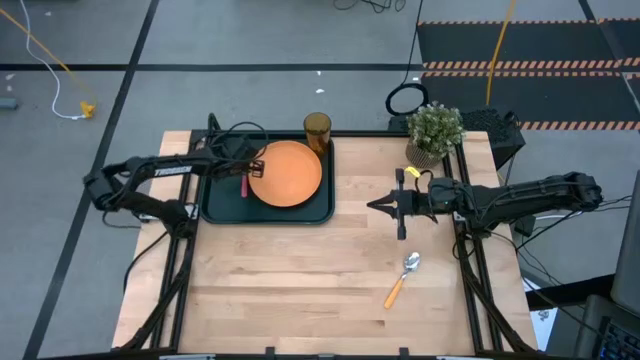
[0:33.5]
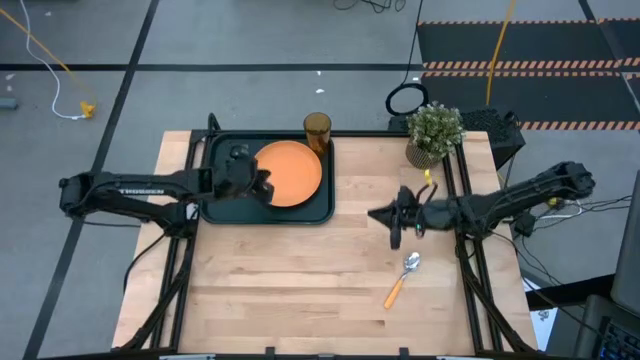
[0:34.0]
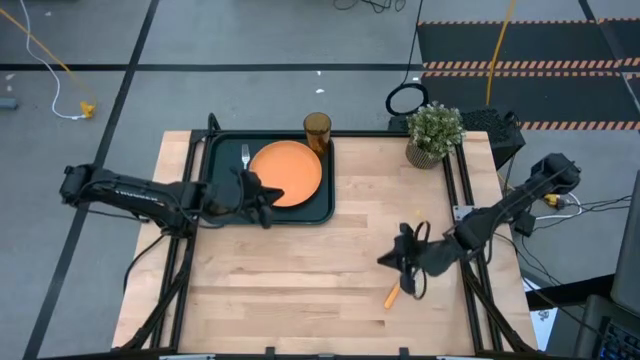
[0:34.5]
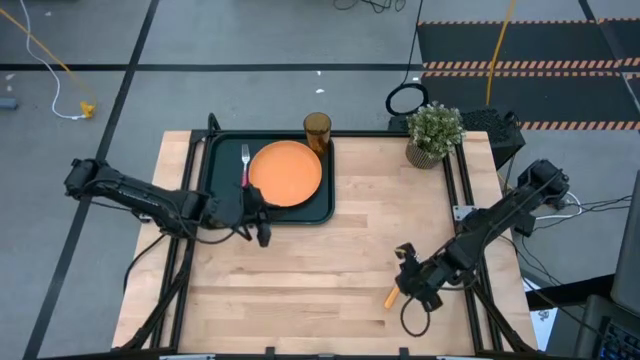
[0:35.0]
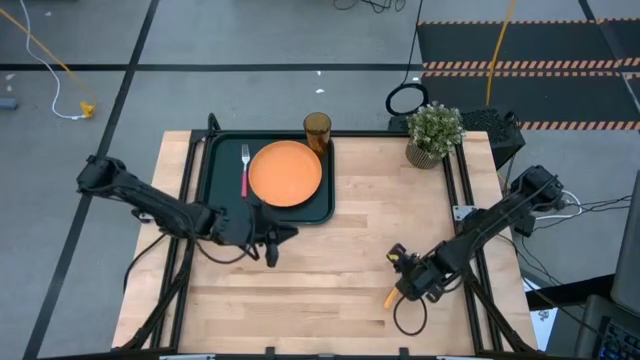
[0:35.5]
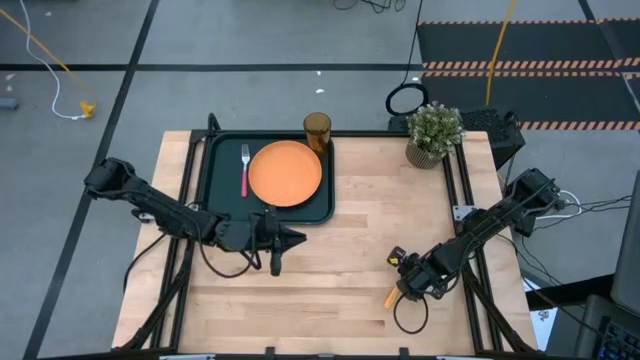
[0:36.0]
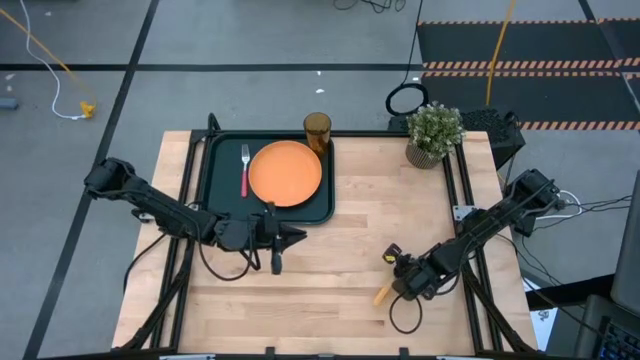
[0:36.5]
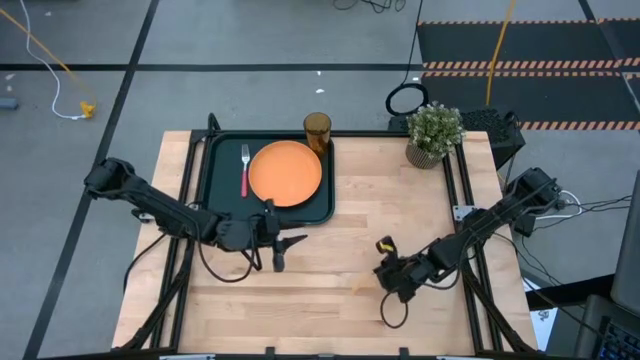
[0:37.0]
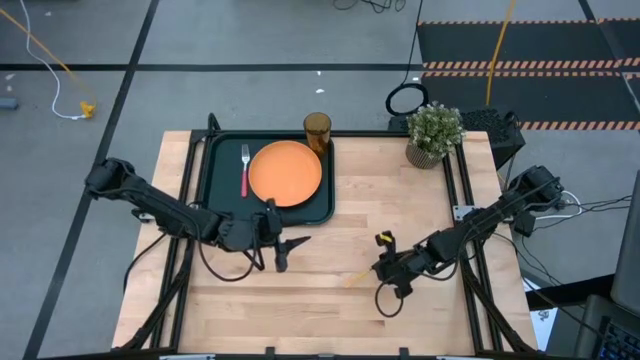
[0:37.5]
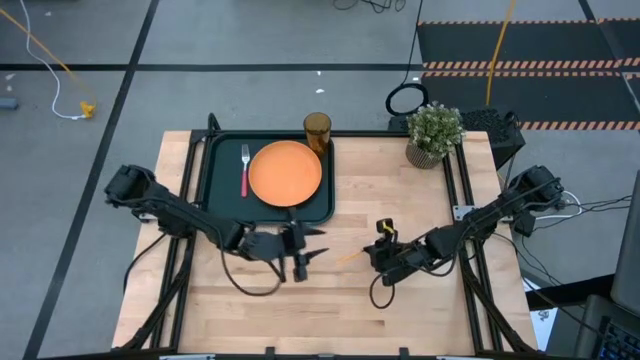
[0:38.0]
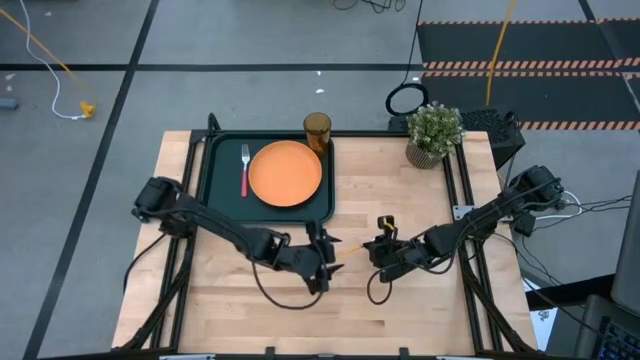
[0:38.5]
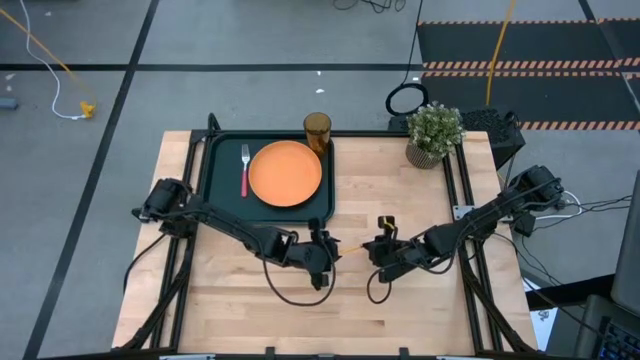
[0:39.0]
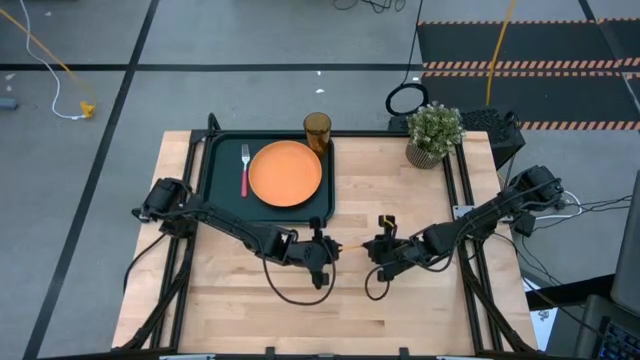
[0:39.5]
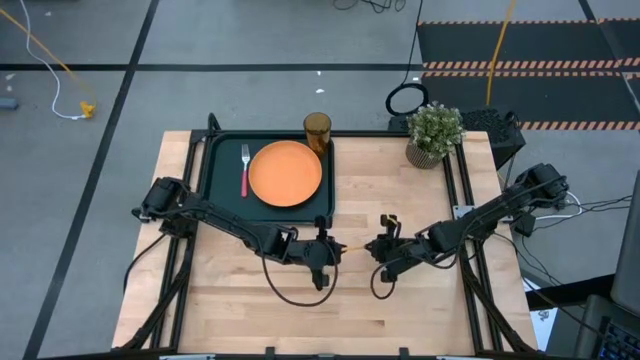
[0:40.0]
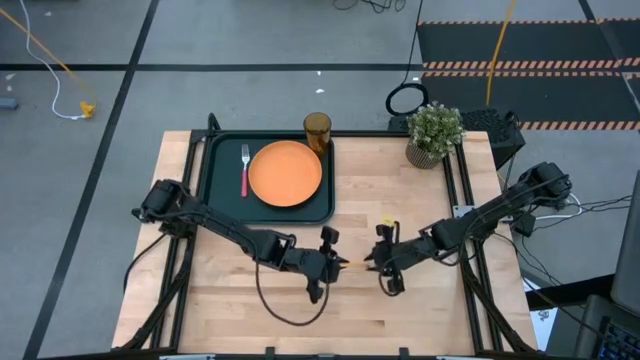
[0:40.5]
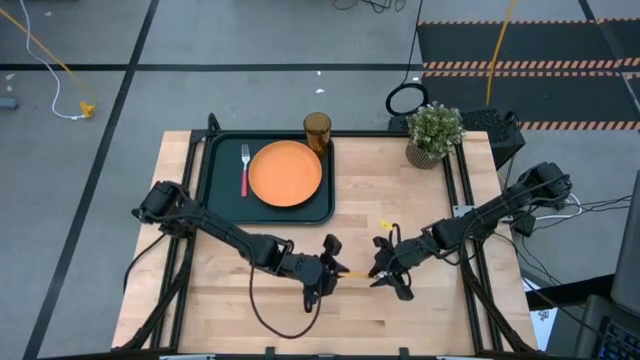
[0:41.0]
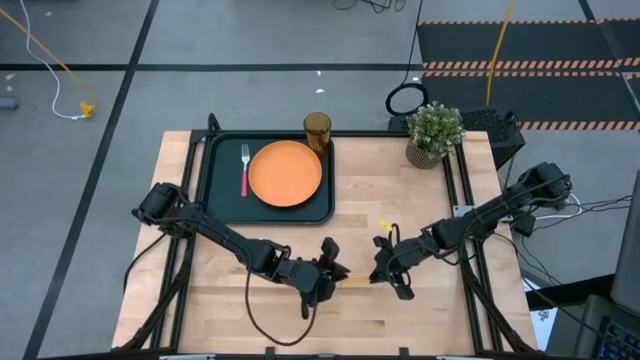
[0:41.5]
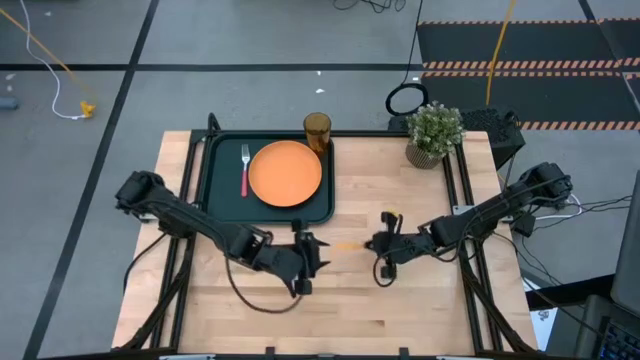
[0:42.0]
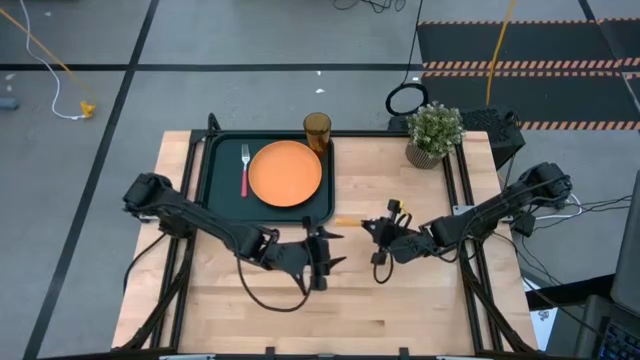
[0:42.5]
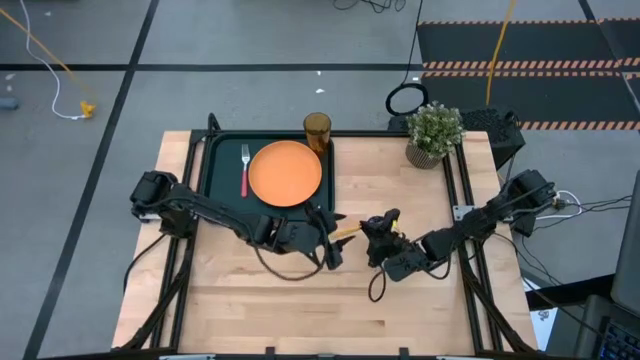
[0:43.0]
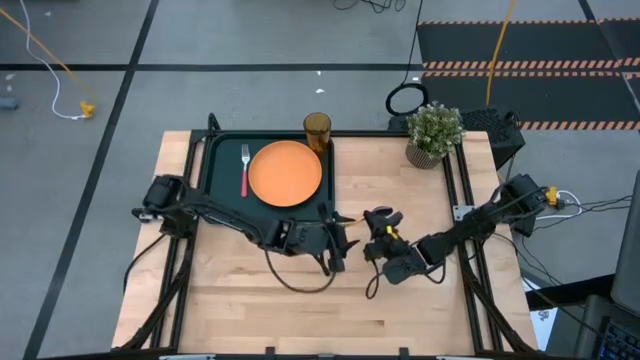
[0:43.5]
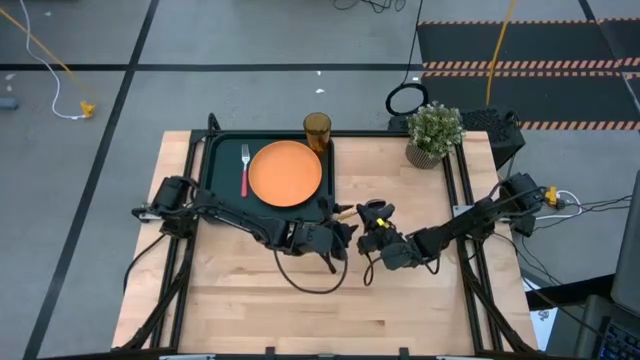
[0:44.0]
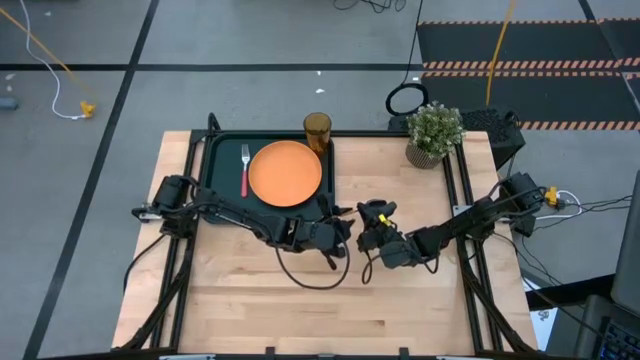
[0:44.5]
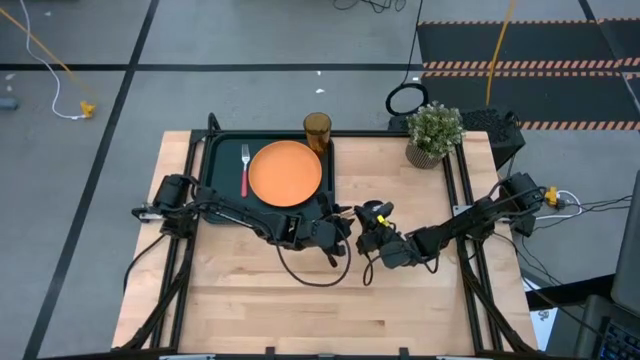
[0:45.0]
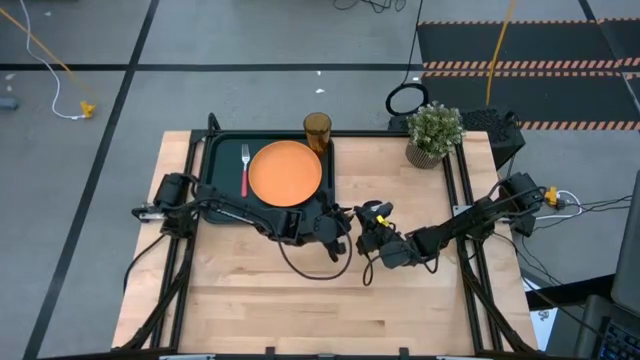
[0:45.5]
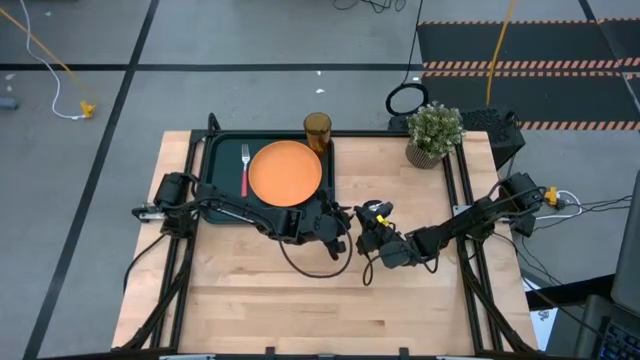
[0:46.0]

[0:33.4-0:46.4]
Task: Pick and place plate/cup/fork/spoon on tray
Put the yellow spoon on the black tray to the left of the pink fork

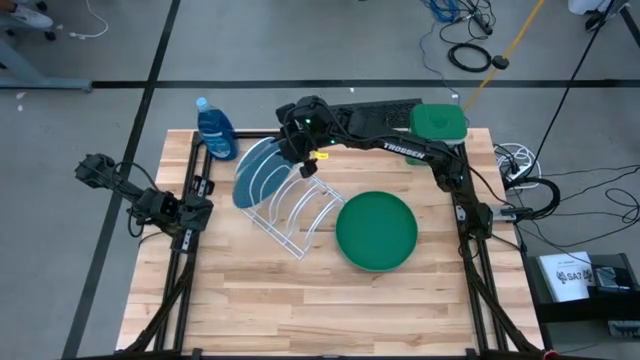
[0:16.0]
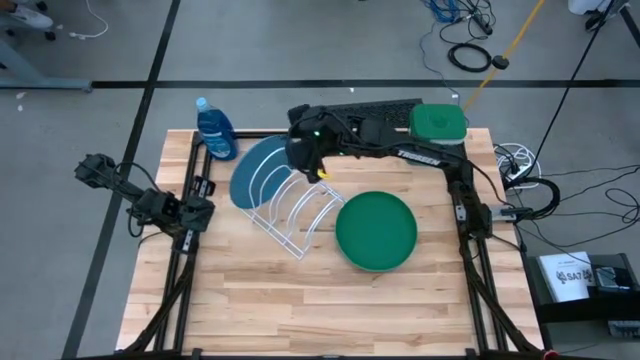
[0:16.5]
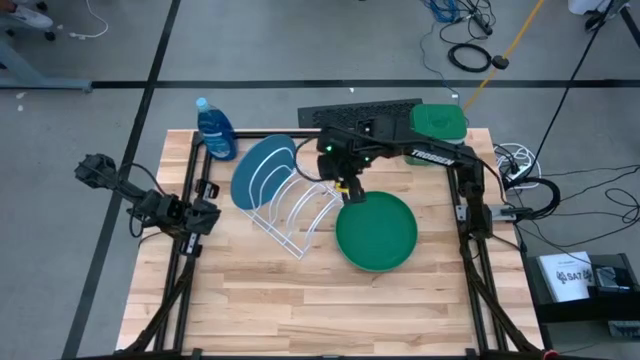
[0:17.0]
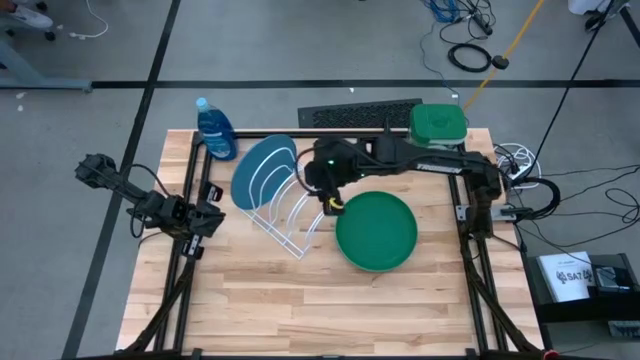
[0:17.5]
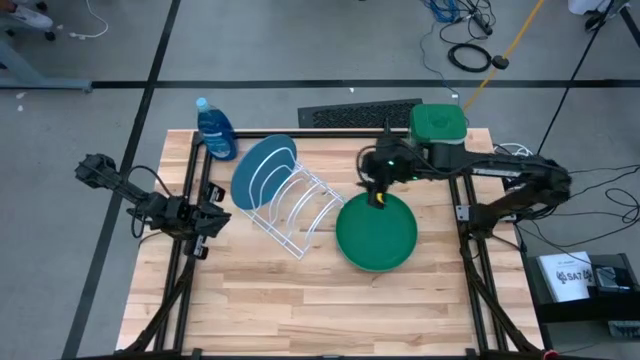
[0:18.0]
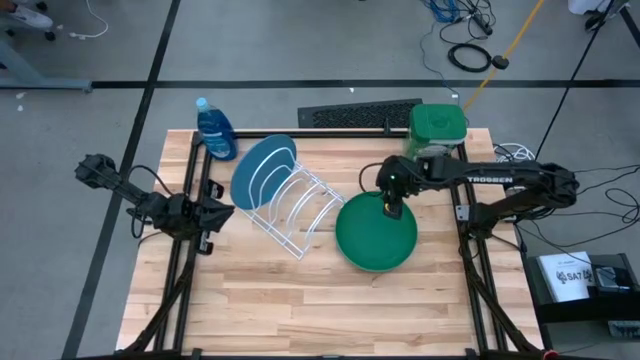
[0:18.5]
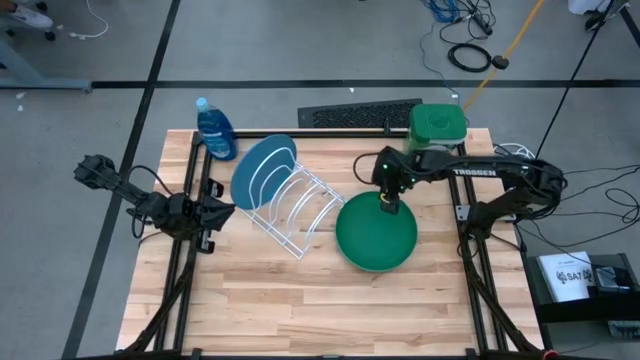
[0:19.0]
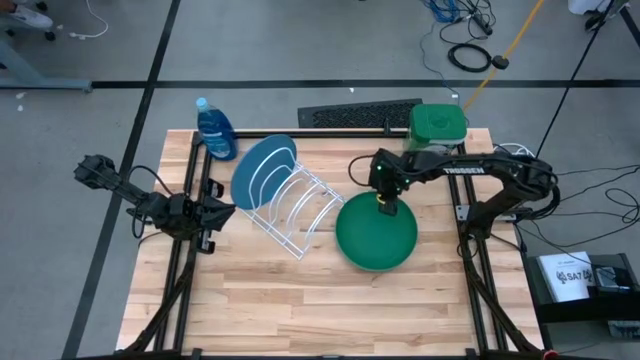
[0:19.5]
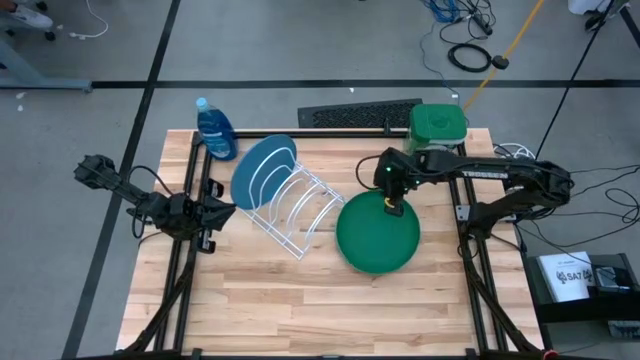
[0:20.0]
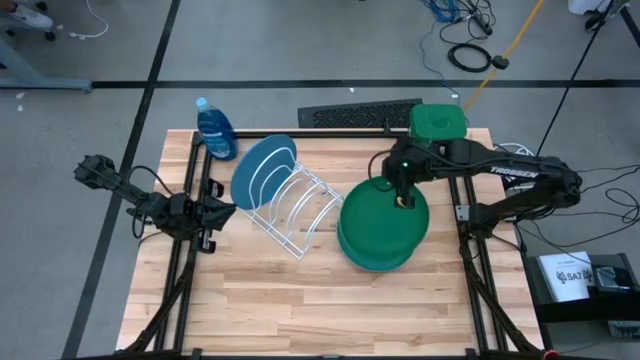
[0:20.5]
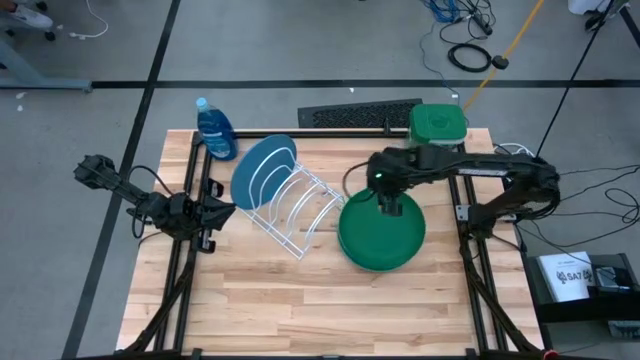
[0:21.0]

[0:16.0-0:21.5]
Task: Sort dishes
Put the green plate on the dish rack
